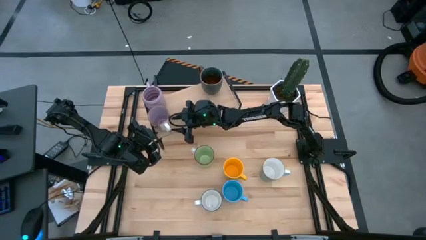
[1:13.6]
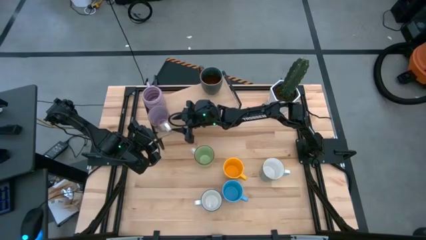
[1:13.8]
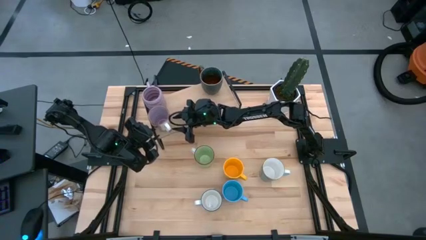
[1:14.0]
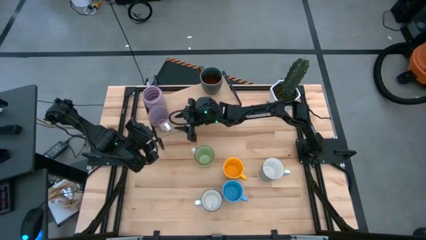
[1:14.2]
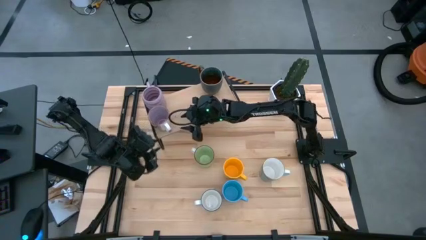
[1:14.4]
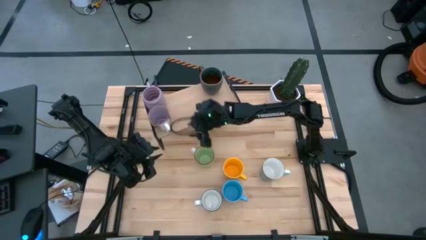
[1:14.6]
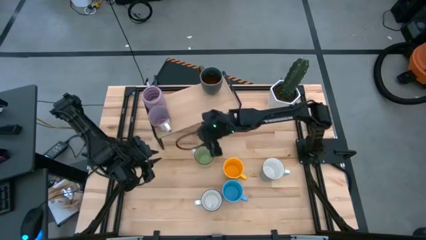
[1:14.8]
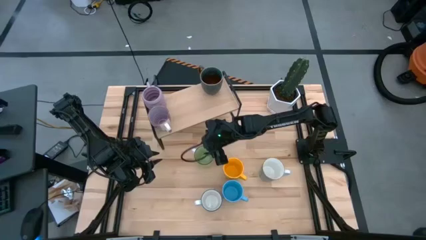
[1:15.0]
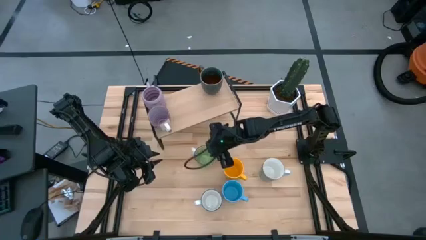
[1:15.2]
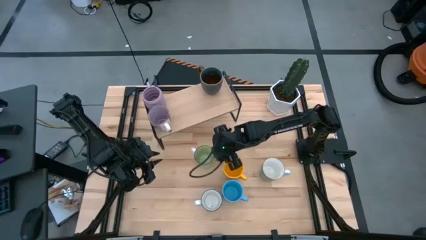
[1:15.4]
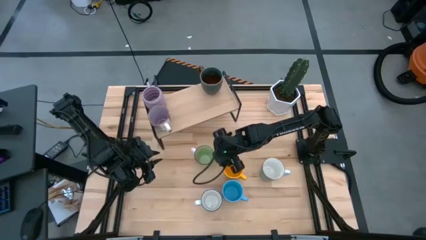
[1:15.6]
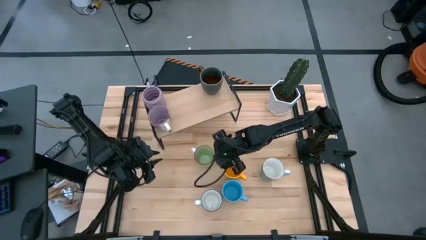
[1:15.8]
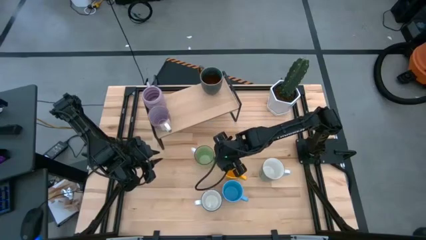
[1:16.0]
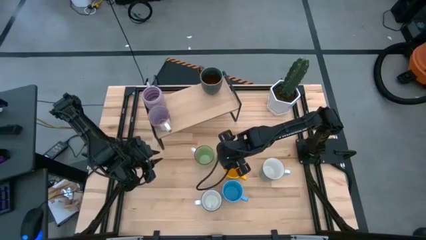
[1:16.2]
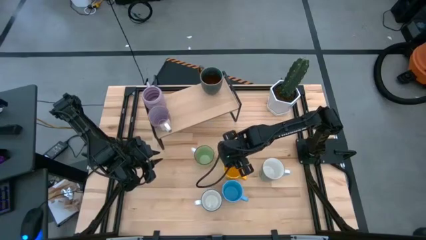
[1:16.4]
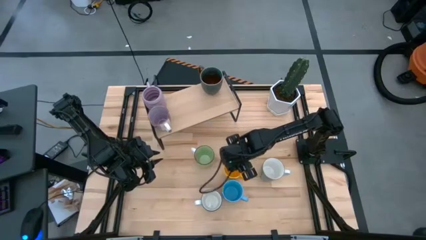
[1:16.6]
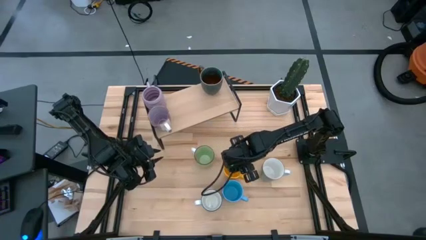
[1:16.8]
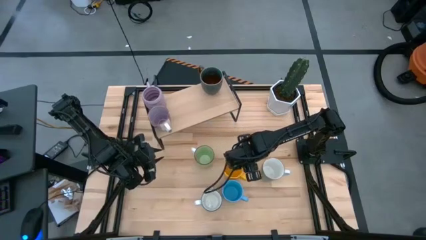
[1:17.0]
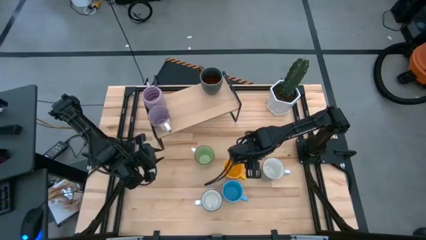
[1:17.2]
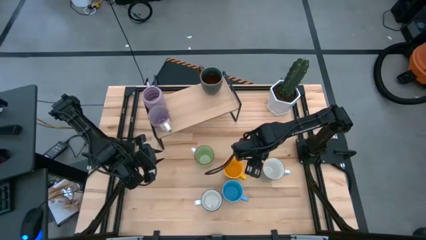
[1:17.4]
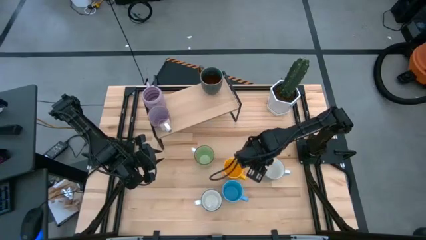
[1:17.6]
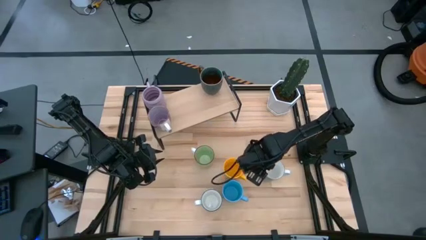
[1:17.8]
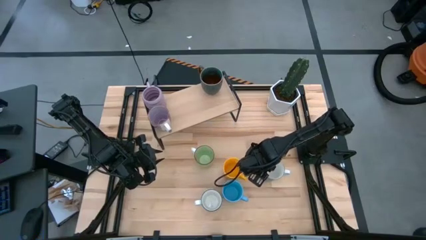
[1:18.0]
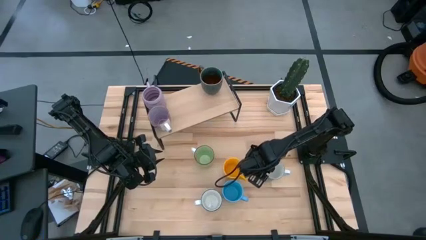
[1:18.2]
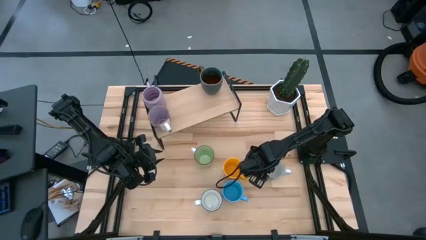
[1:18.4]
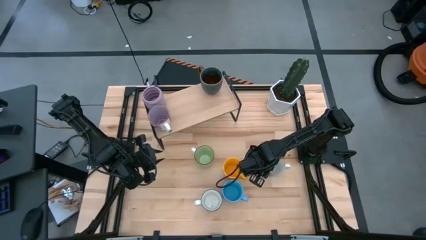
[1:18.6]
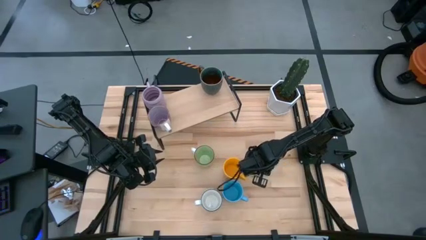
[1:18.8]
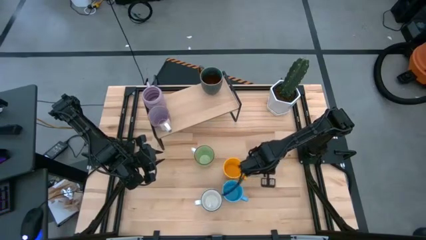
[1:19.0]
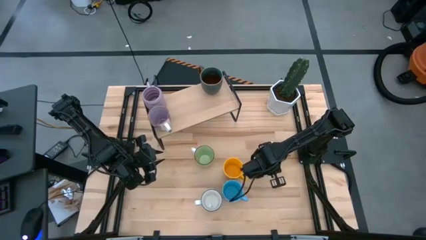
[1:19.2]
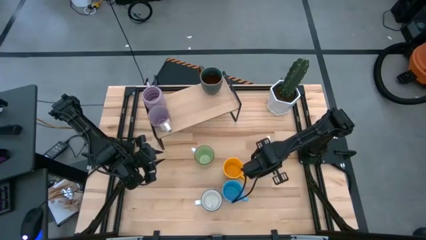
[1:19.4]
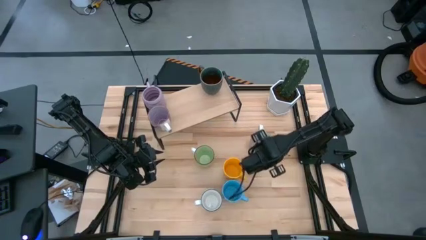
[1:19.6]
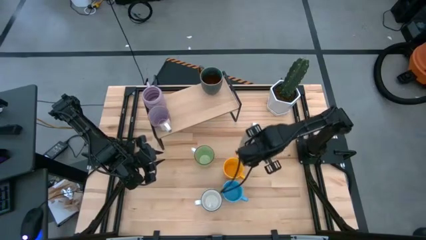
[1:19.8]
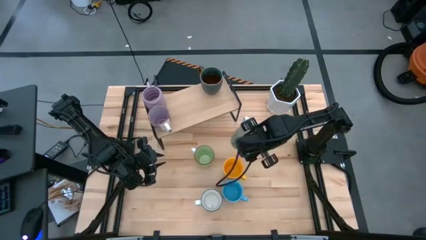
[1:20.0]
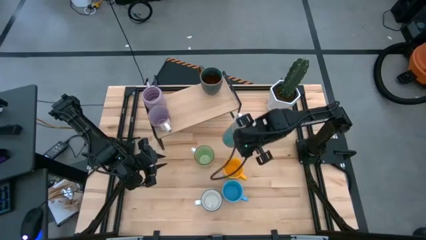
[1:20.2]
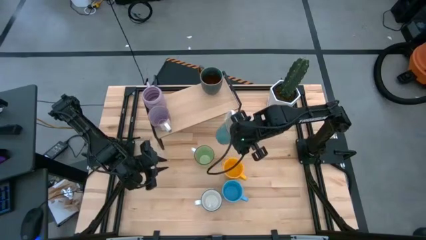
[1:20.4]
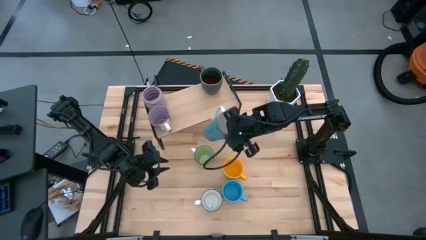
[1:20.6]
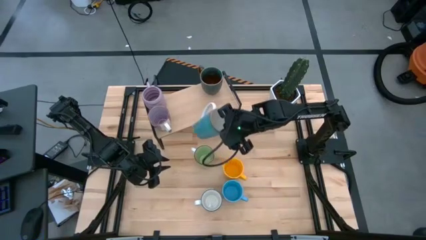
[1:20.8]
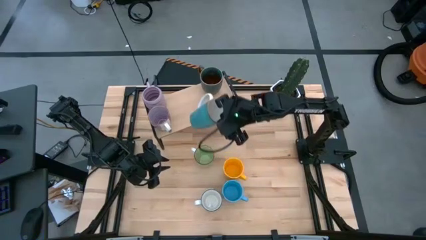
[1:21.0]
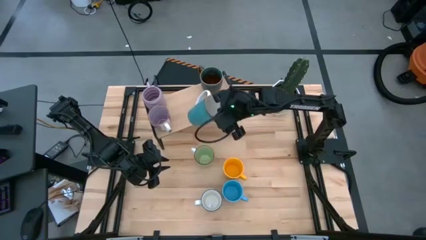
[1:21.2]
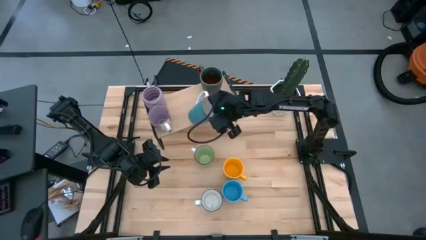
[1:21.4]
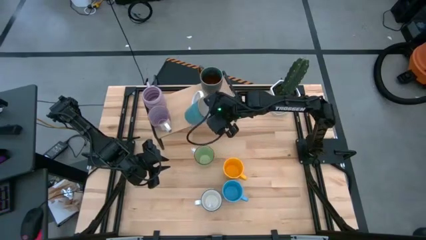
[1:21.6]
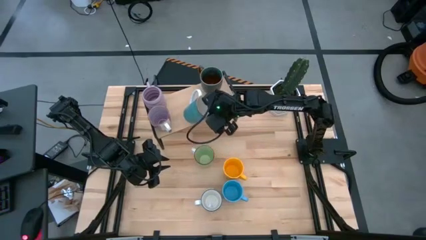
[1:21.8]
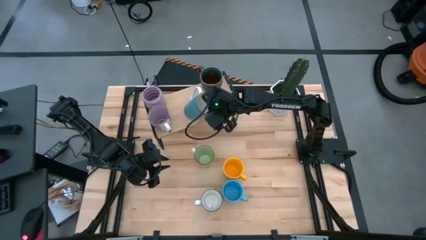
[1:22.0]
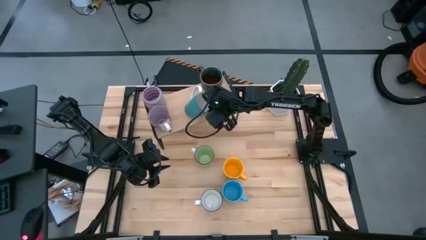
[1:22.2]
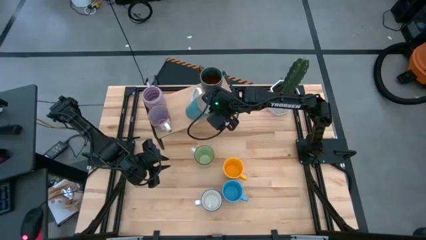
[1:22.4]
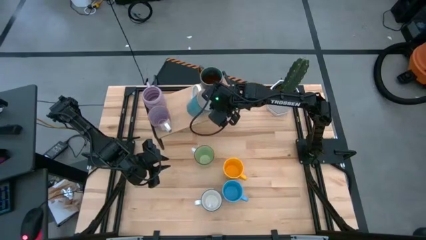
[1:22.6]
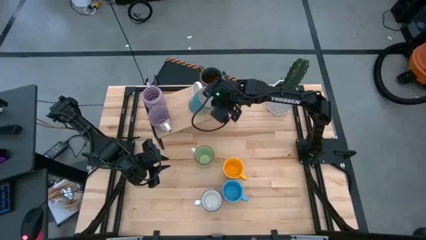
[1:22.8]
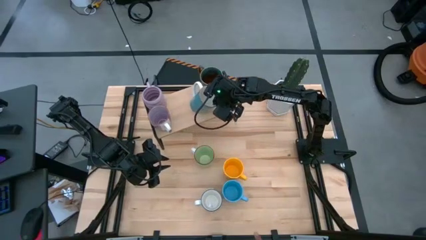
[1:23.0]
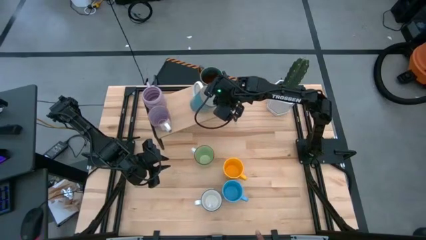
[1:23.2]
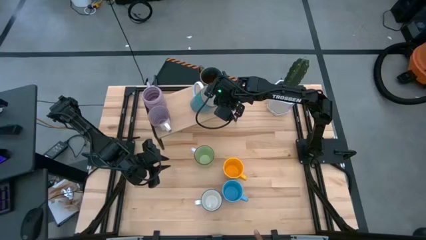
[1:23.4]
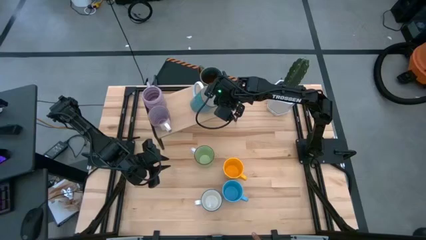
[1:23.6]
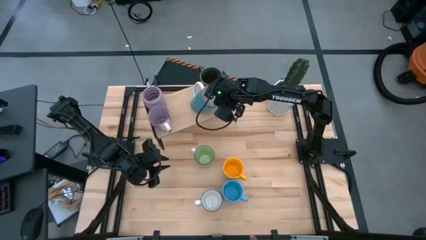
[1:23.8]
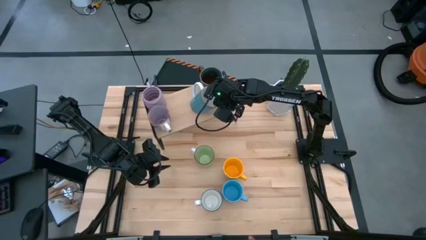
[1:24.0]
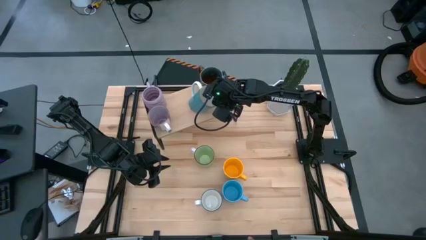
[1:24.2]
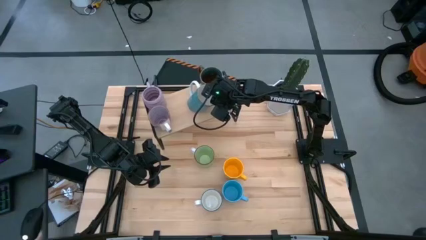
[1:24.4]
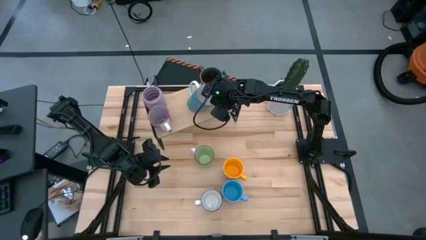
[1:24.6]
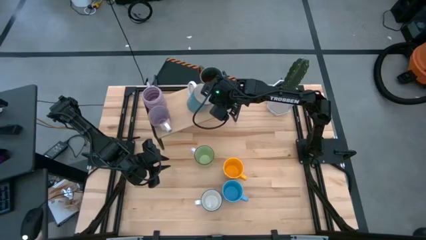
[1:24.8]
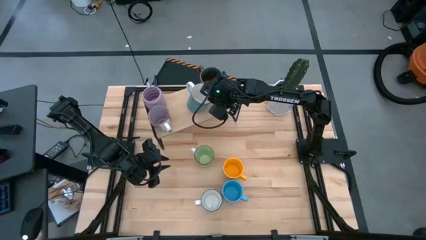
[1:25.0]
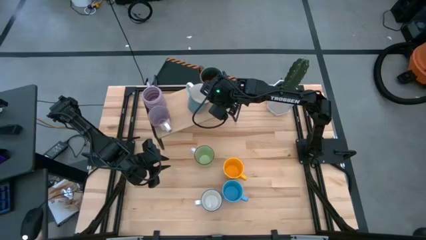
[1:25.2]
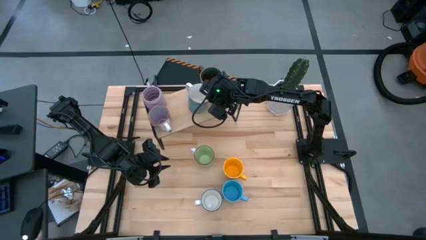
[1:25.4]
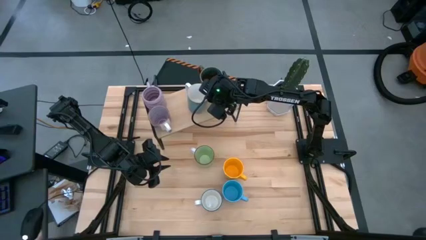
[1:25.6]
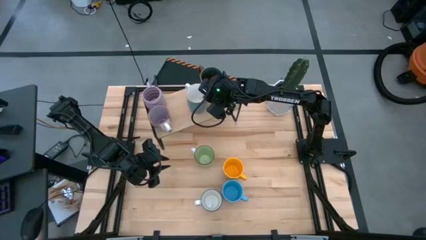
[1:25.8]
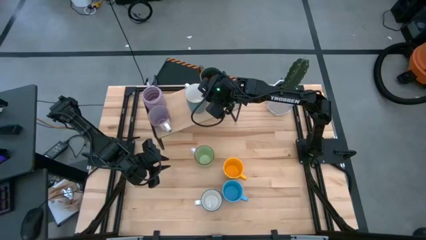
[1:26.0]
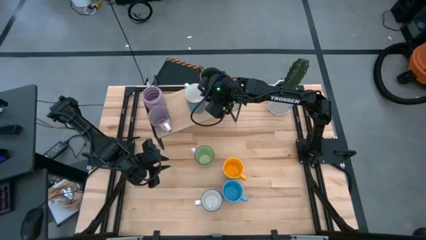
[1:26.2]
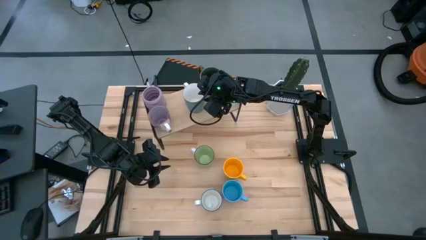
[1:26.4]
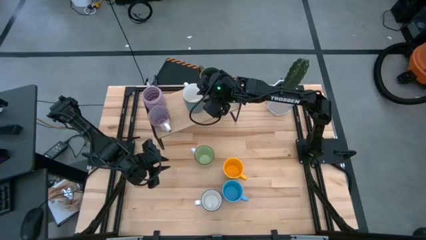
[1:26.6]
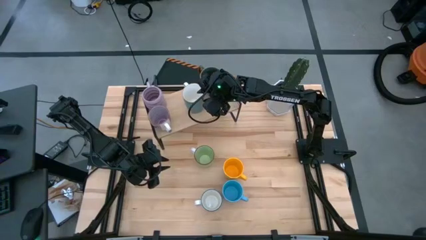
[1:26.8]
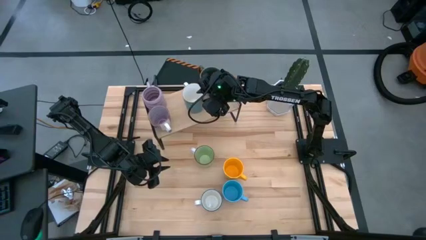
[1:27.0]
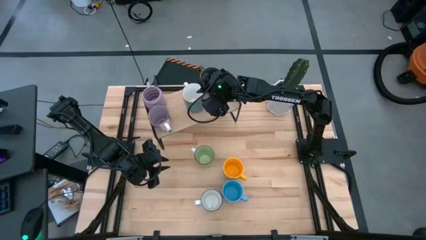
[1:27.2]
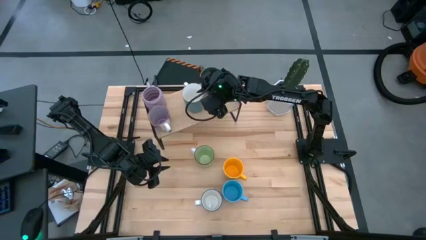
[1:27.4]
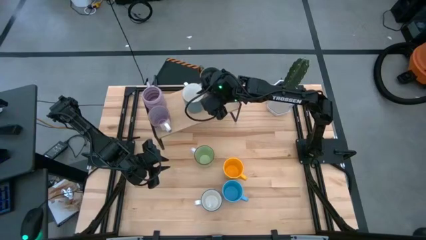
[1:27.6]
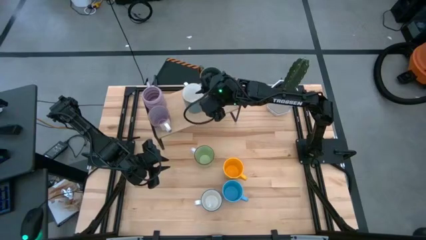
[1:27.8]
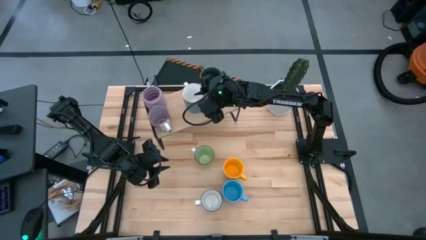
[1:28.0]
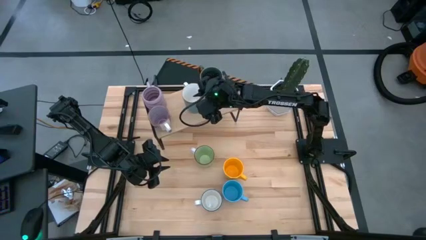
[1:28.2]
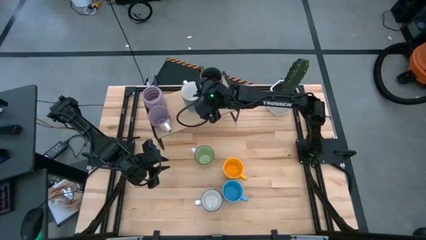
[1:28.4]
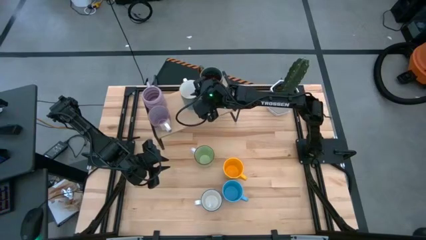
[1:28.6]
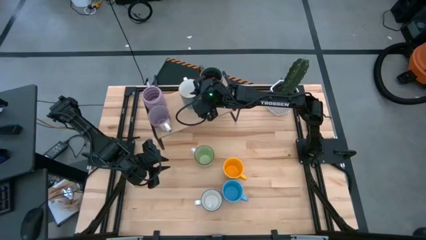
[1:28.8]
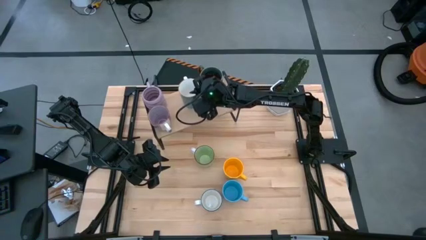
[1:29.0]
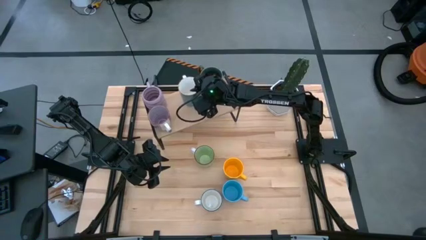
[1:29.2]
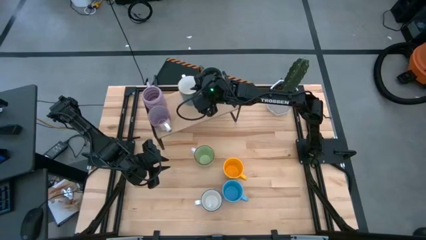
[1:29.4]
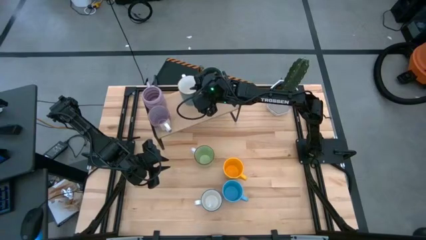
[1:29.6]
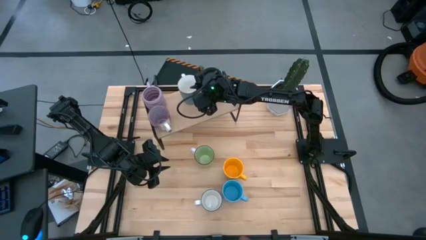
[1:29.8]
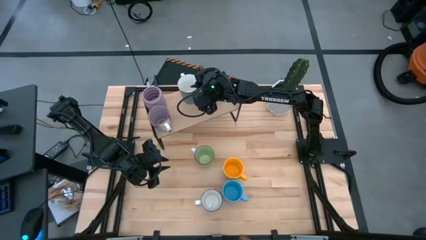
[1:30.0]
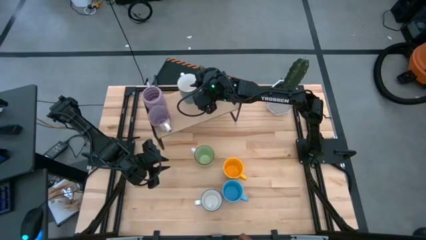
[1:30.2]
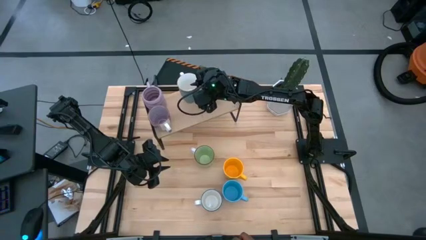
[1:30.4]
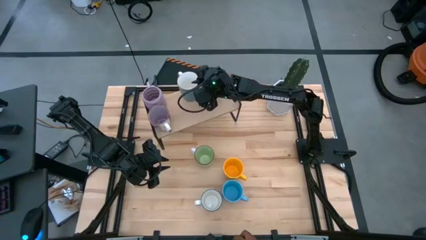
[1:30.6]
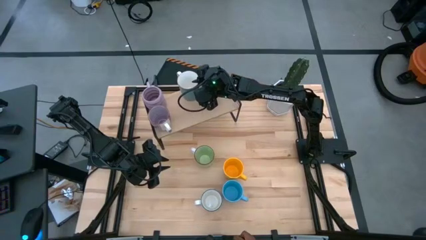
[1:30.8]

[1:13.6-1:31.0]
Task: Place coffee mugs
Put the blue-green mug on the shelf
